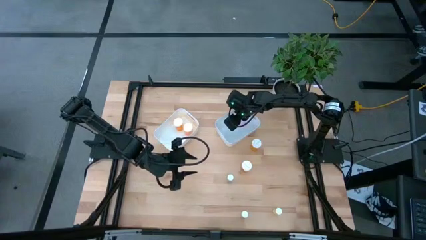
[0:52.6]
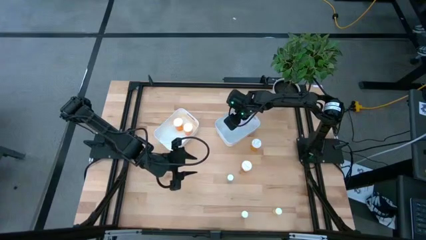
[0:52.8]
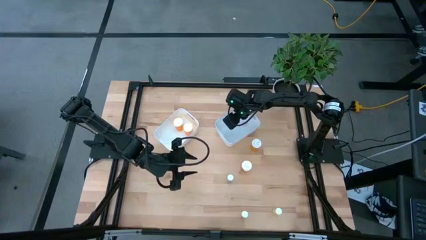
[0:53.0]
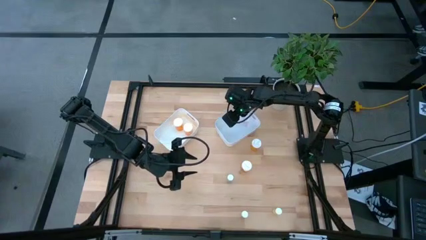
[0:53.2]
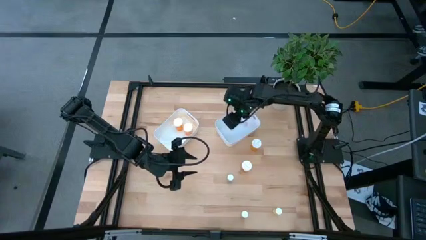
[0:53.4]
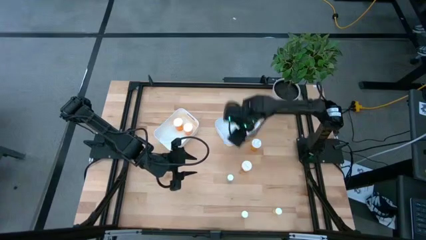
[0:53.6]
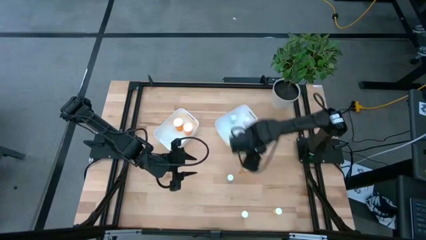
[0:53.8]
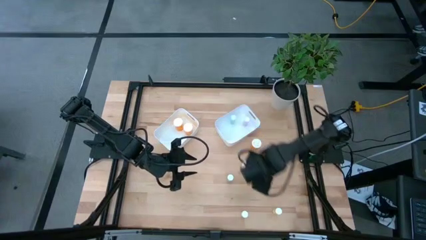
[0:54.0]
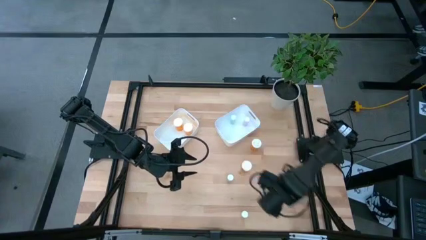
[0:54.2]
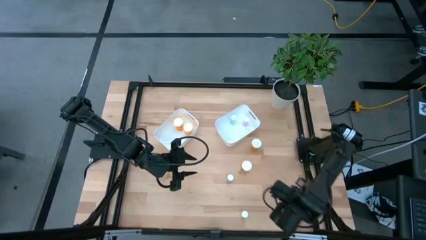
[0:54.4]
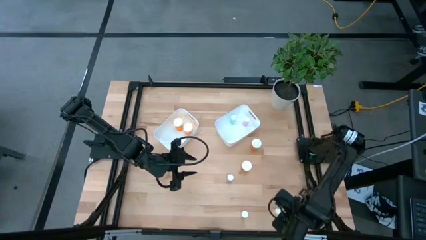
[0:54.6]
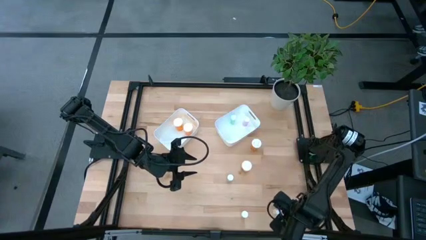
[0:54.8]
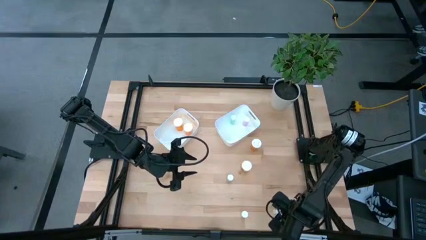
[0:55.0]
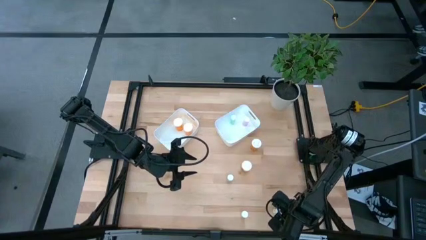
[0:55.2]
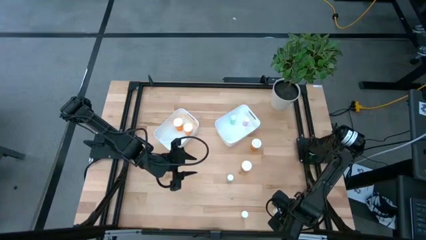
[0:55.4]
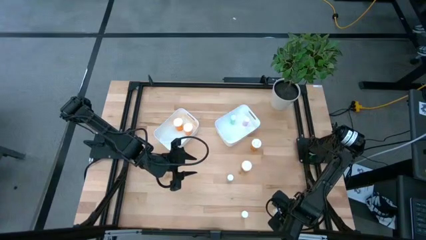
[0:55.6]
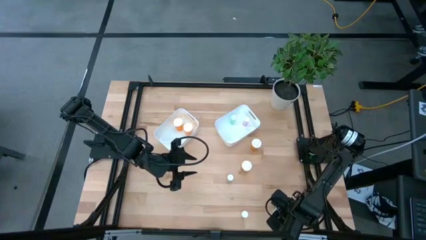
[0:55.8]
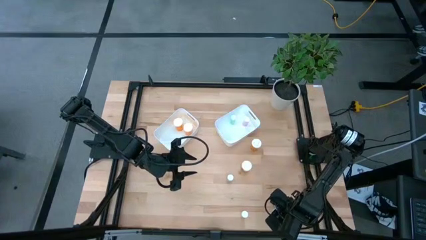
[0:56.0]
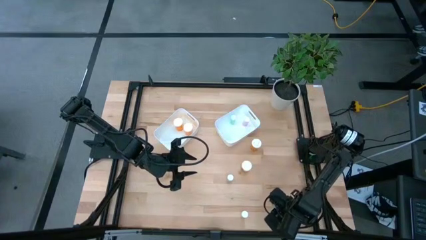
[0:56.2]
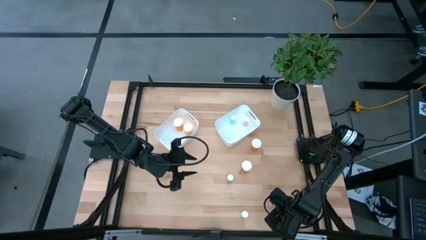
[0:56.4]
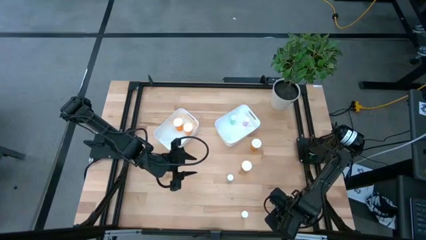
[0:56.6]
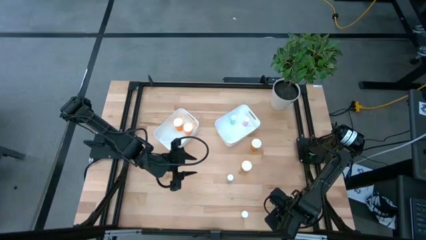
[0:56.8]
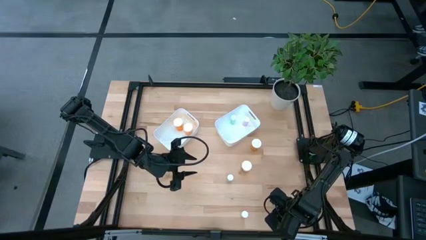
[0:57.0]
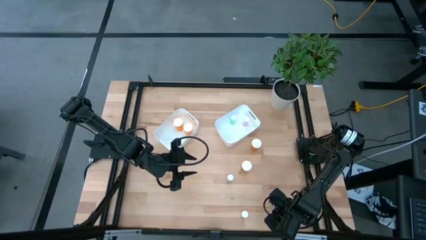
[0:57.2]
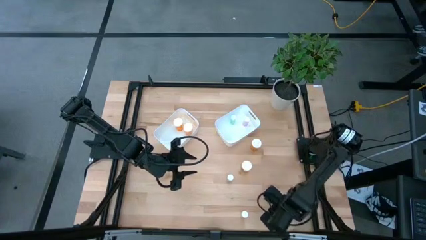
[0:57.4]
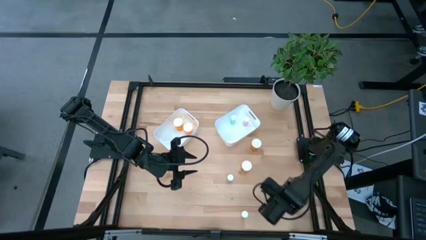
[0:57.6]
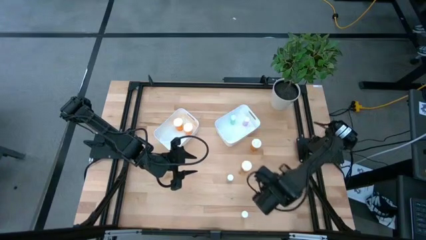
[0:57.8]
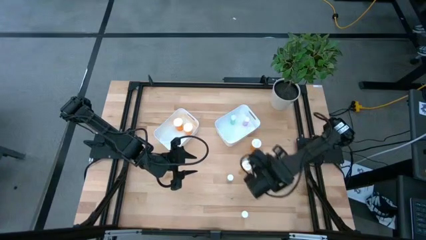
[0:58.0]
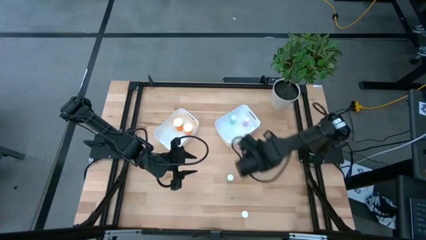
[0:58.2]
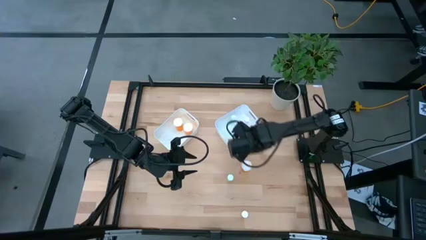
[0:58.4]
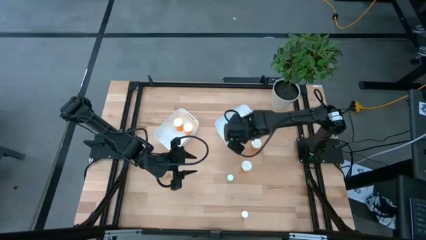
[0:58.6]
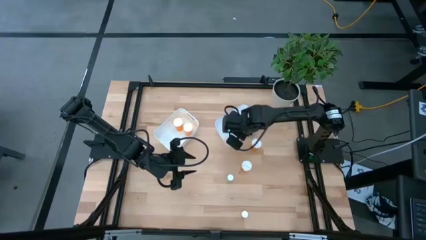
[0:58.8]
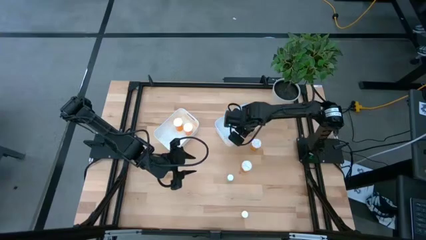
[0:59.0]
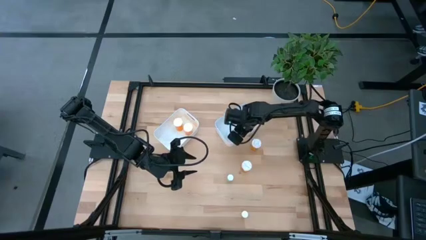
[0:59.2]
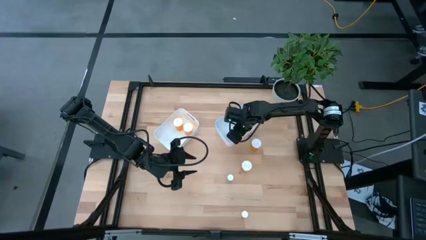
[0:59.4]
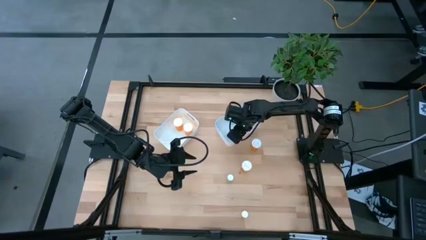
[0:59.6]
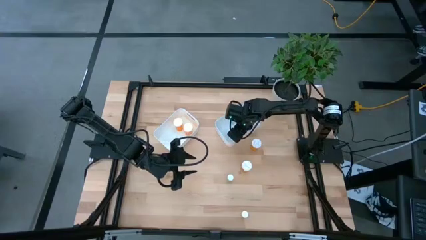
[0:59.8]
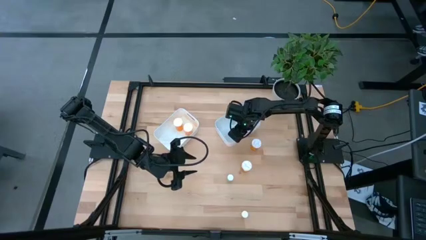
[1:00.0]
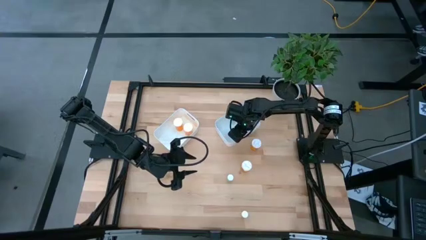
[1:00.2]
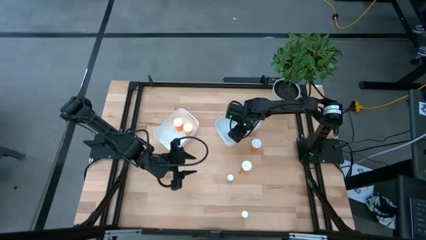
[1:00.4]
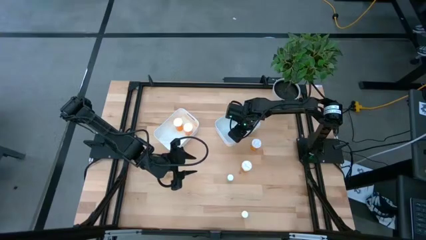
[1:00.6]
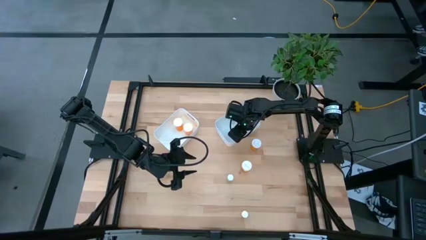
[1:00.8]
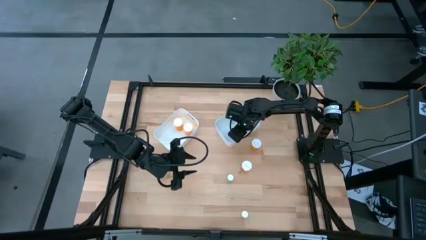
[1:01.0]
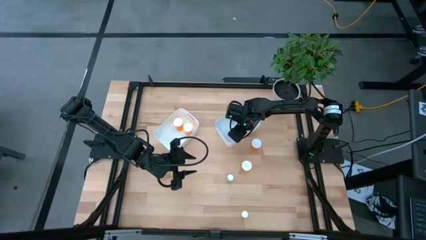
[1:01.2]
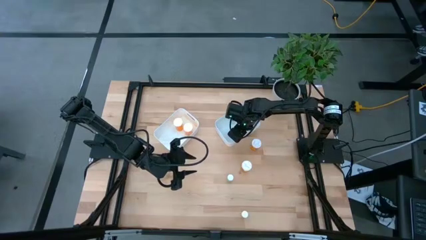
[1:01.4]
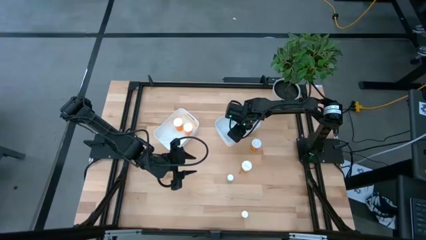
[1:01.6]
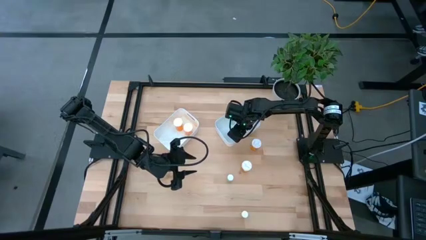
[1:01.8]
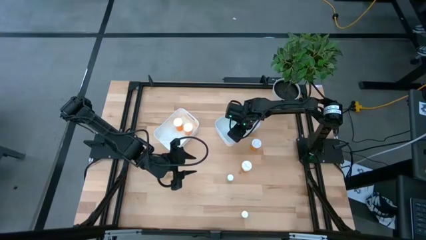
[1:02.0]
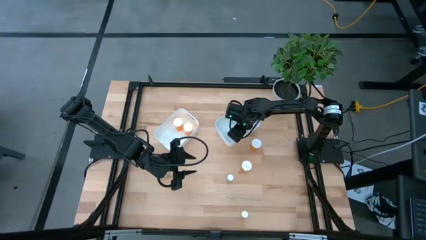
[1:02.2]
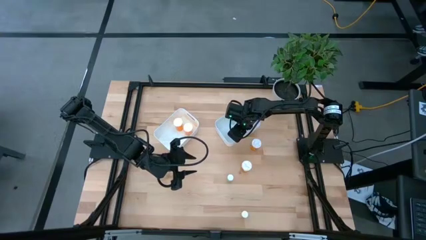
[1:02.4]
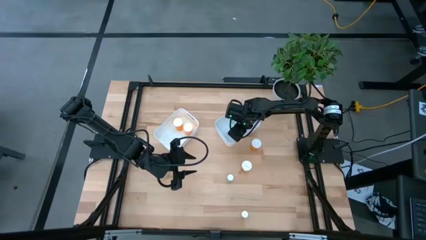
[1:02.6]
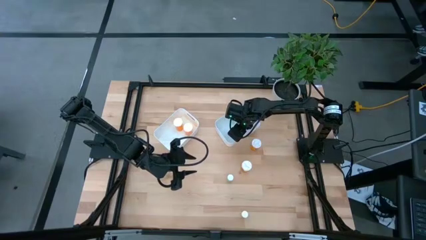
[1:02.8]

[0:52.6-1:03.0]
Task: Pick and place medicine bottles into bin by pill shape (circle, oval)
Put the yellow tablet bottle into the right white bin

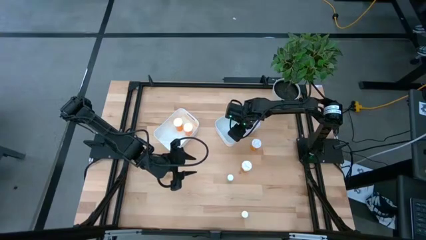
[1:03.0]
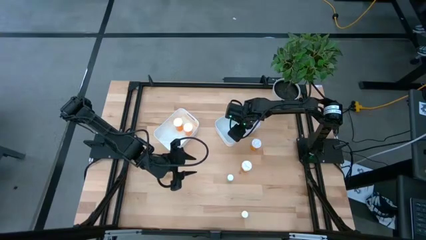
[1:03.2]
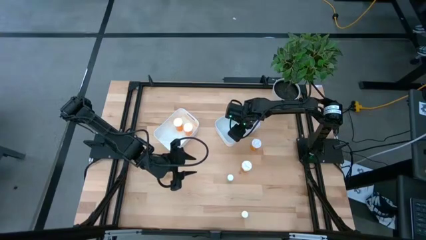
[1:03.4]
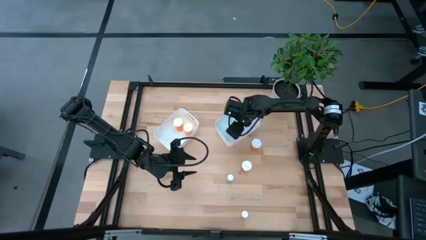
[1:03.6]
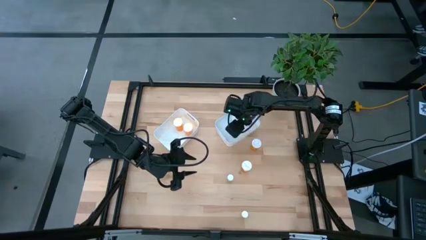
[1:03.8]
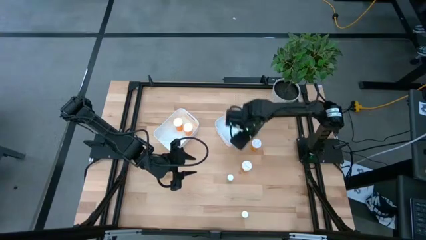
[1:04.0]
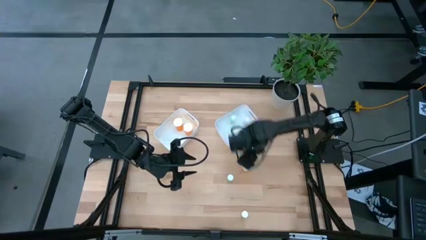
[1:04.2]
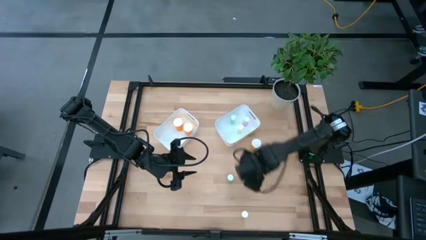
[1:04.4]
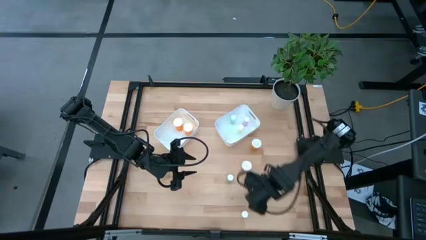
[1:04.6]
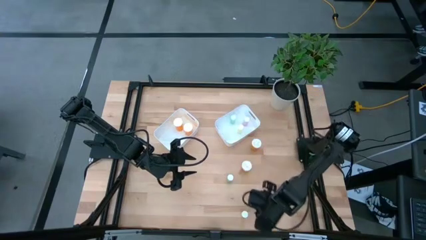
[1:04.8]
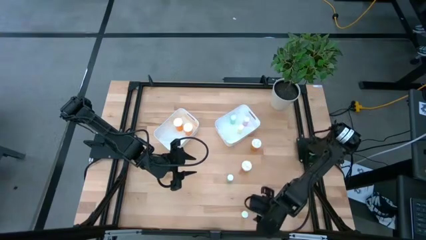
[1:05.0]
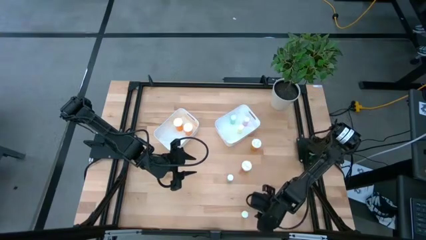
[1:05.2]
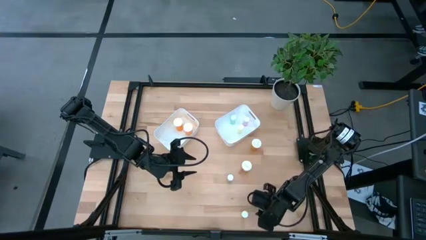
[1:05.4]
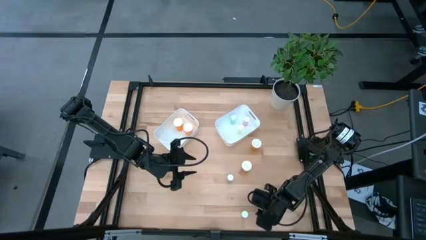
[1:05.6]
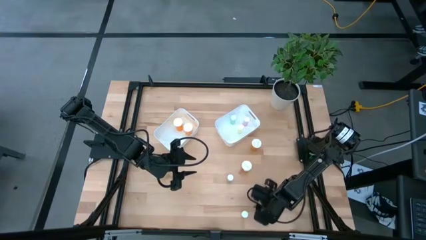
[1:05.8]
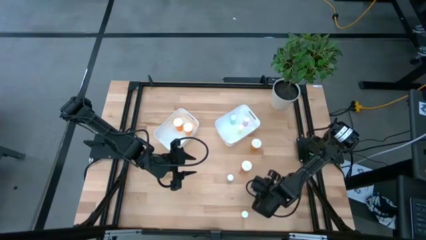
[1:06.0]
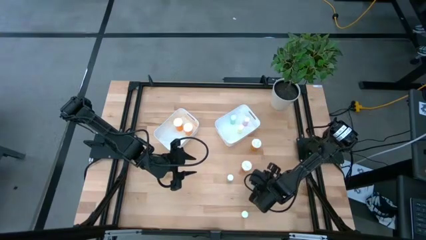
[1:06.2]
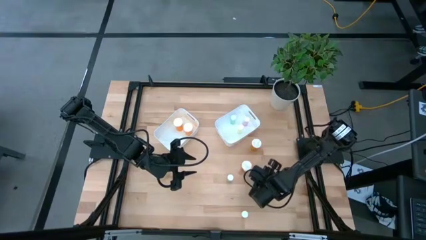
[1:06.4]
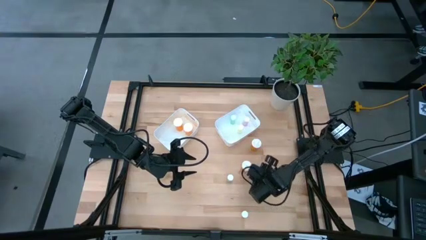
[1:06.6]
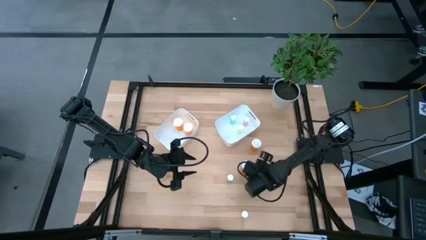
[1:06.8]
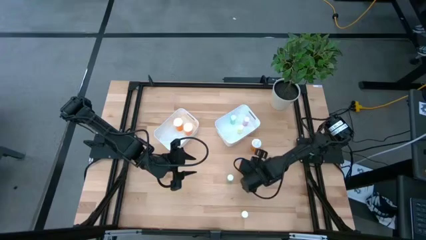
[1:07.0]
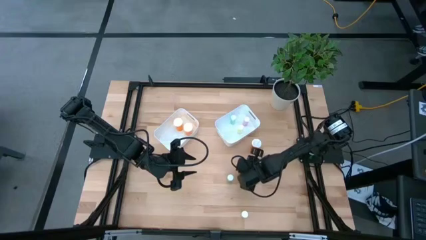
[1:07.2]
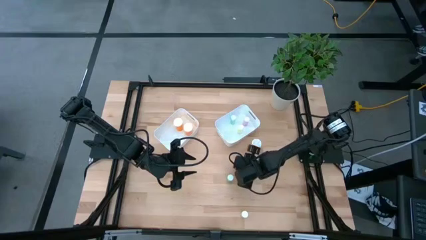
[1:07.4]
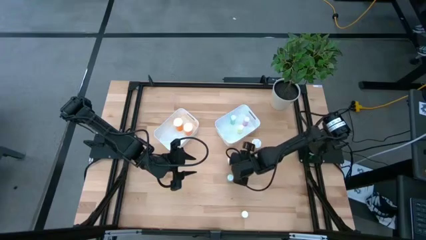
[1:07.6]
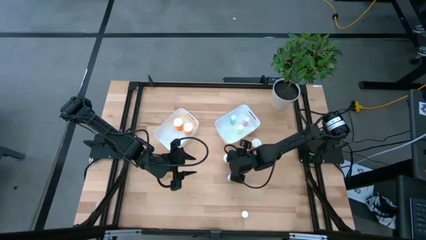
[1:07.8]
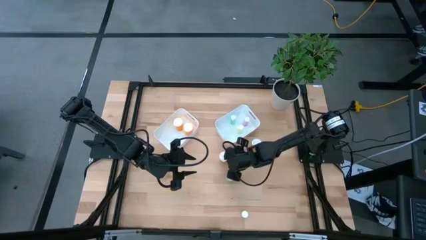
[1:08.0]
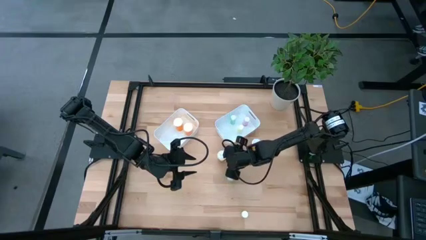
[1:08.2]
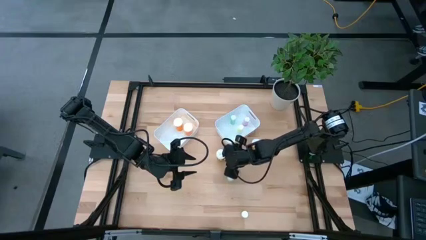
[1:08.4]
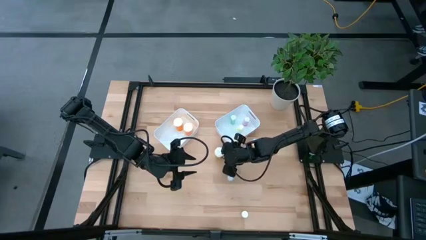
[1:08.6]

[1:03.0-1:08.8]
Move the orange capsule bottle to the center of the table
